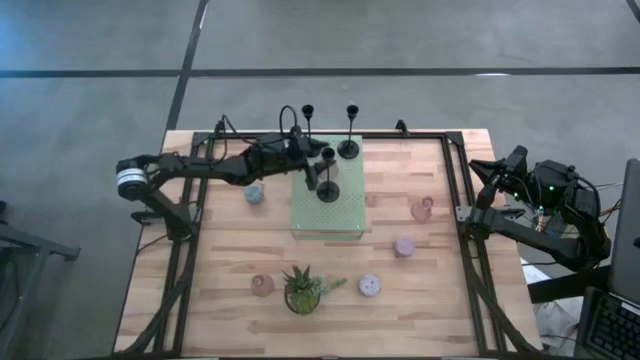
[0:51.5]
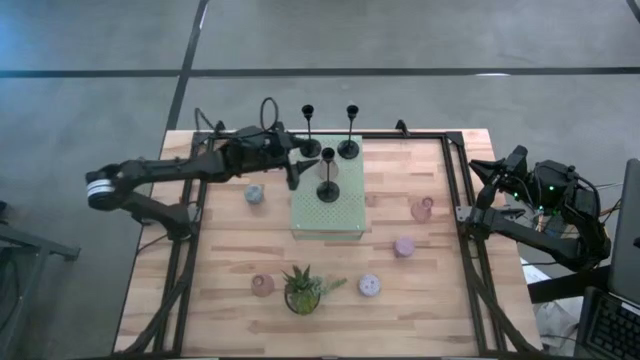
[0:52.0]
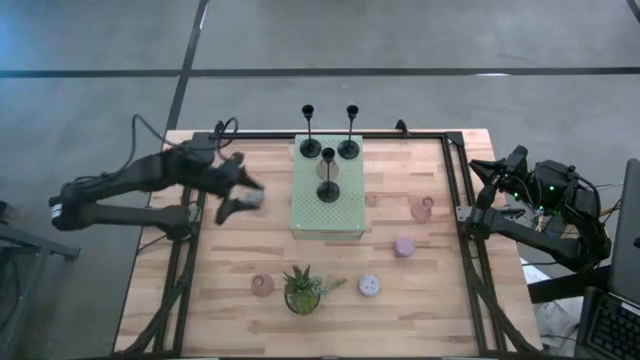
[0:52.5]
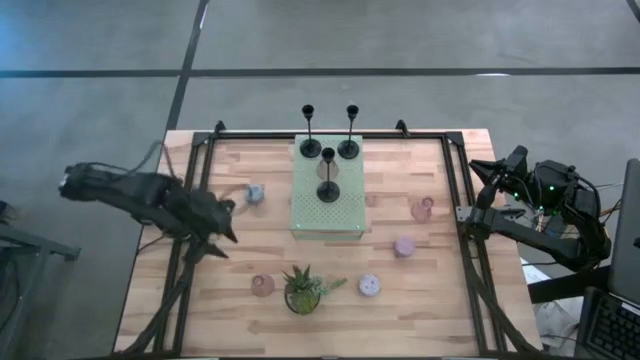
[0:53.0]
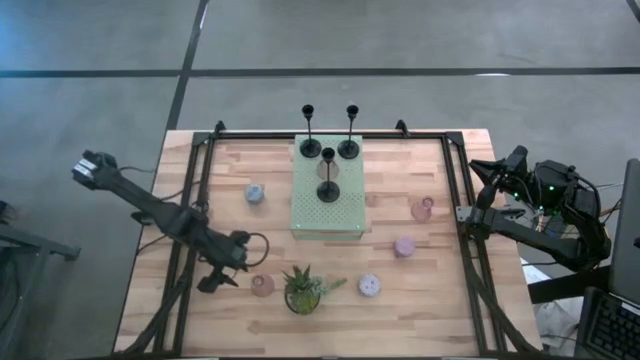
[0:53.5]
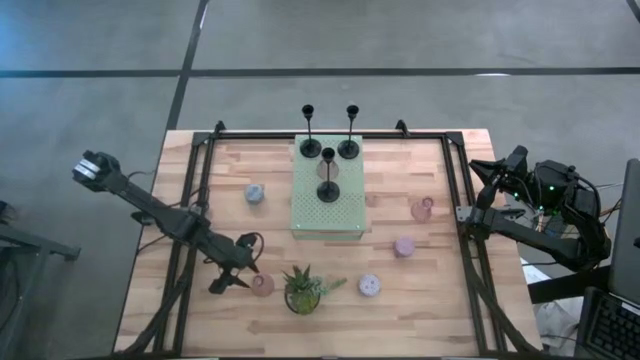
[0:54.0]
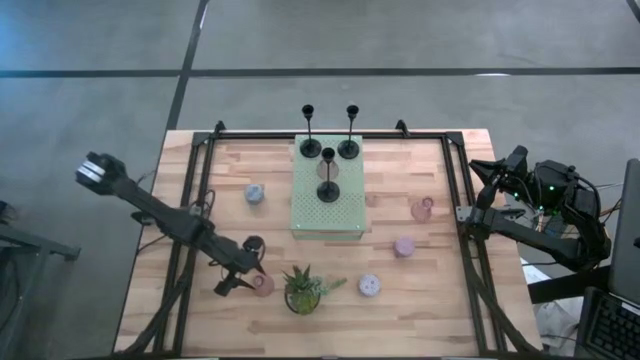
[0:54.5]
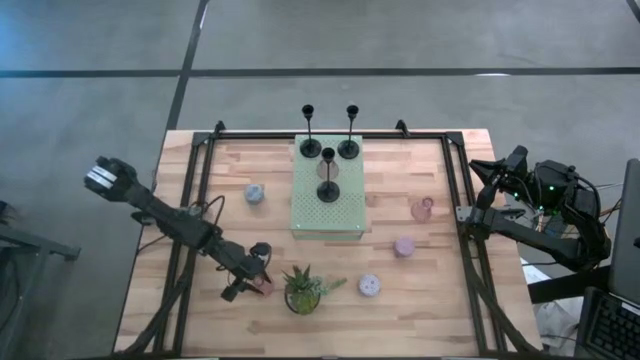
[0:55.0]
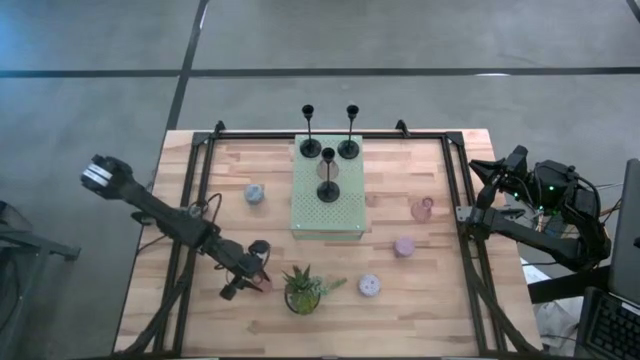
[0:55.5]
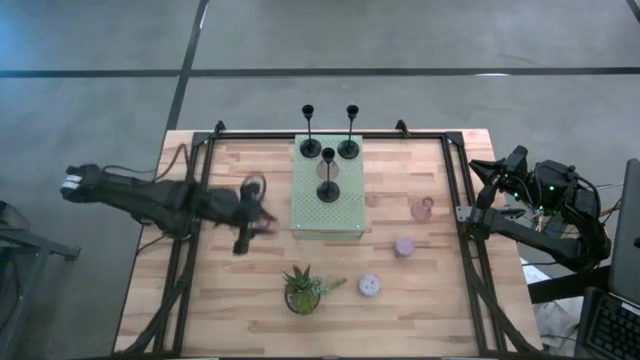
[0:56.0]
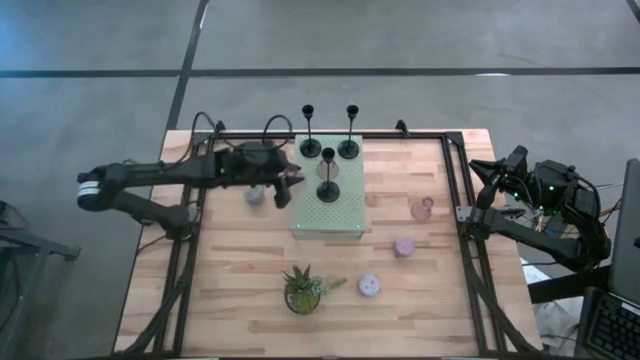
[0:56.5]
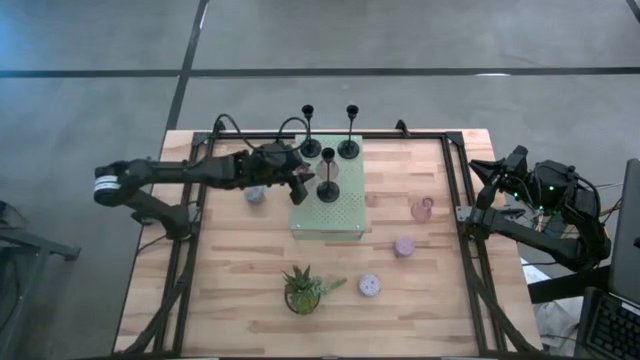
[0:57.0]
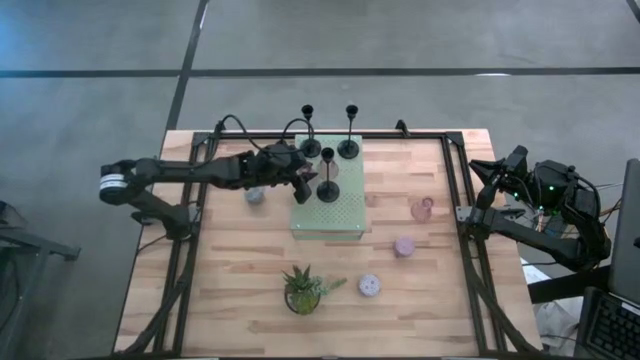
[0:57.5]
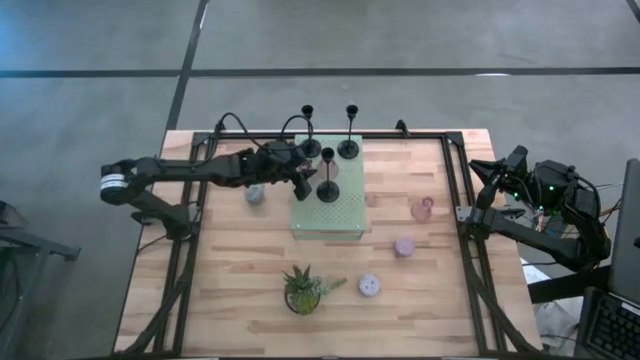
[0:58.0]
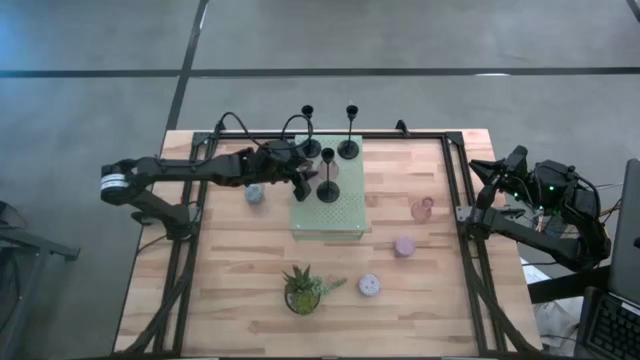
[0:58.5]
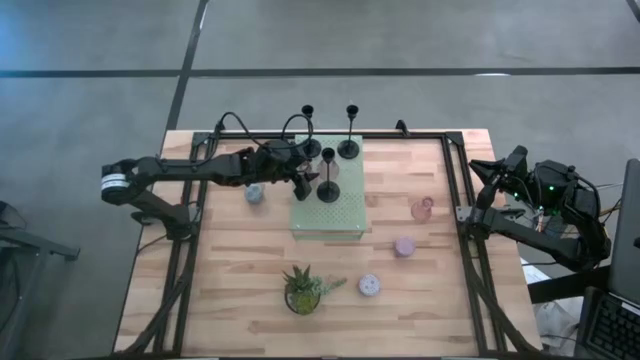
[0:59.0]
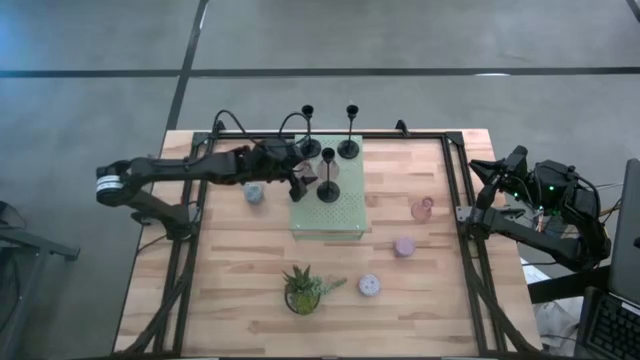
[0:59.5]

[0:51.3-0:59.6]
Task: Pick & Place candle stick holders
Put the bottom pink glass candle holder on the shelf

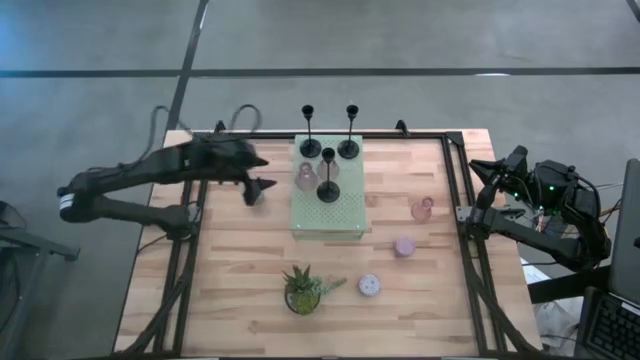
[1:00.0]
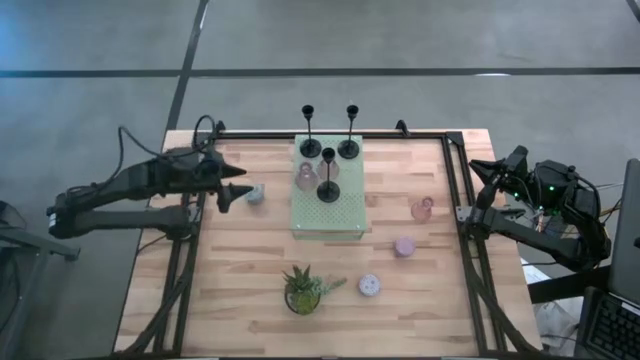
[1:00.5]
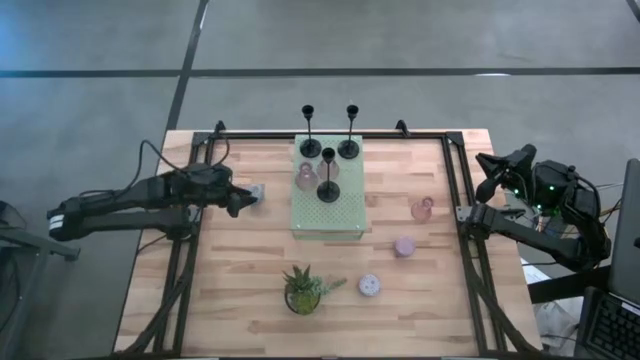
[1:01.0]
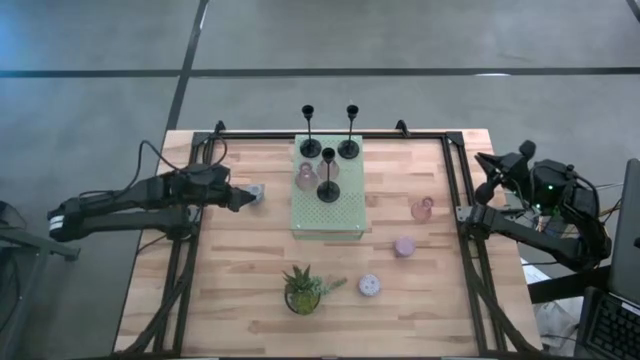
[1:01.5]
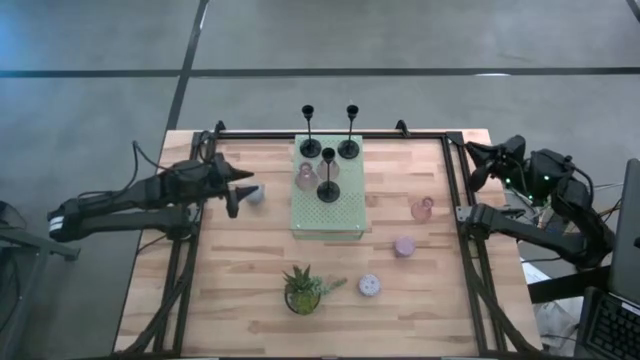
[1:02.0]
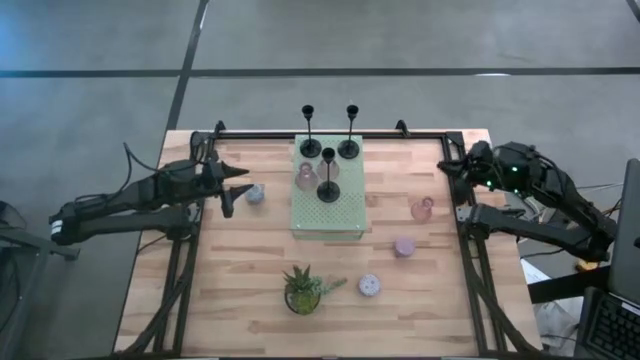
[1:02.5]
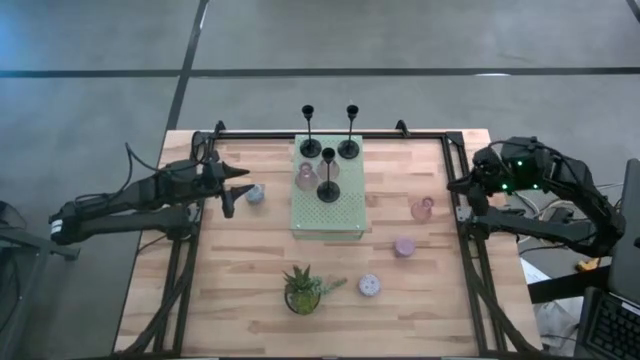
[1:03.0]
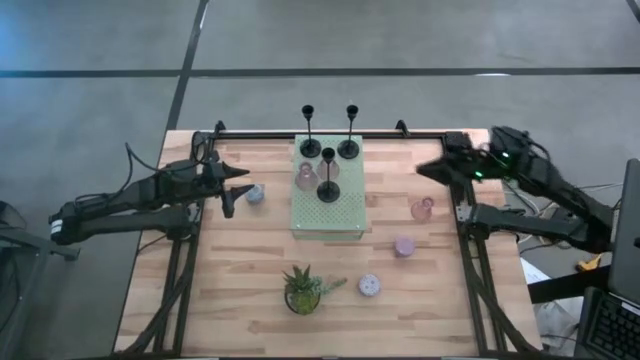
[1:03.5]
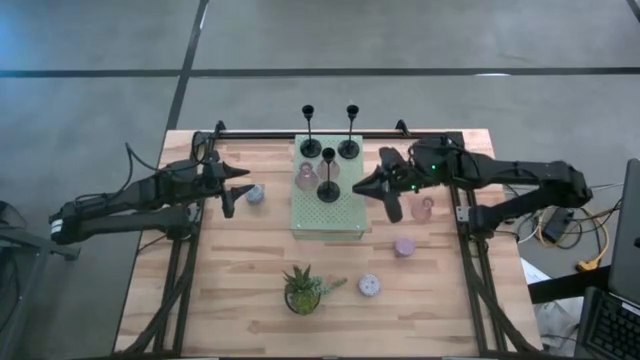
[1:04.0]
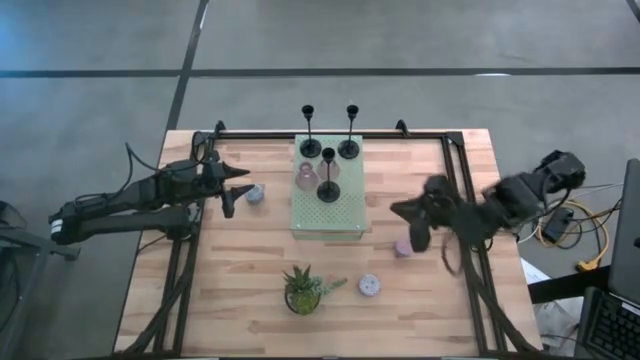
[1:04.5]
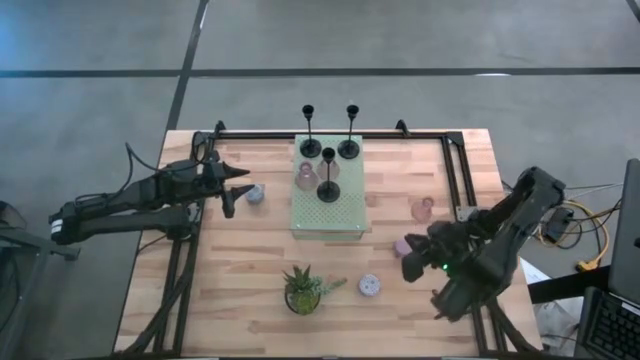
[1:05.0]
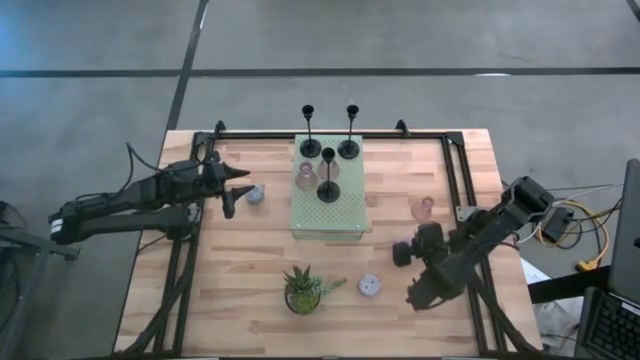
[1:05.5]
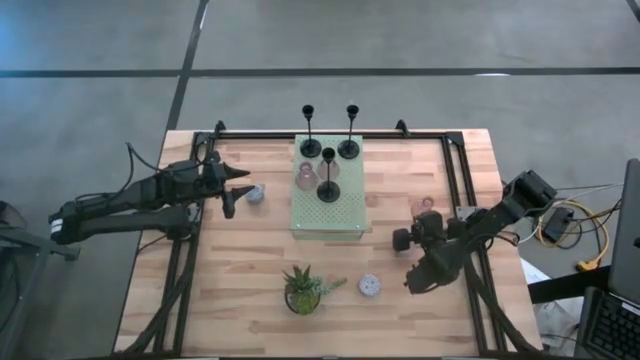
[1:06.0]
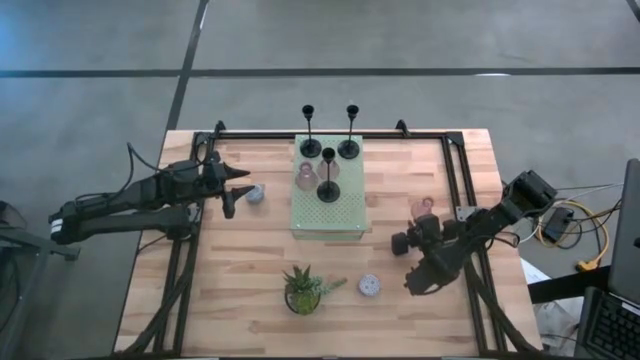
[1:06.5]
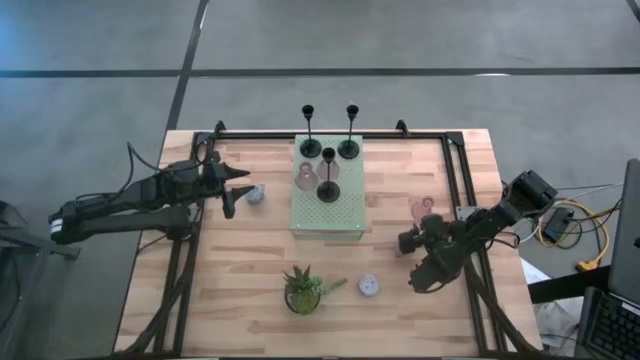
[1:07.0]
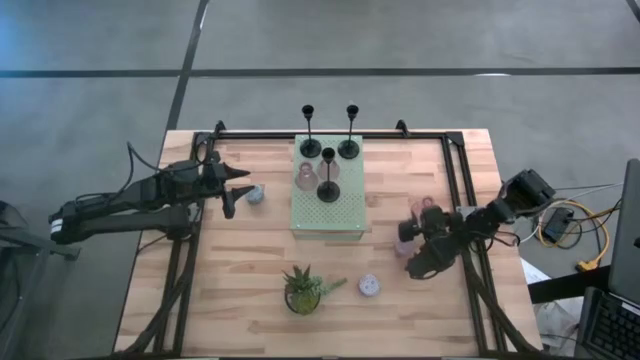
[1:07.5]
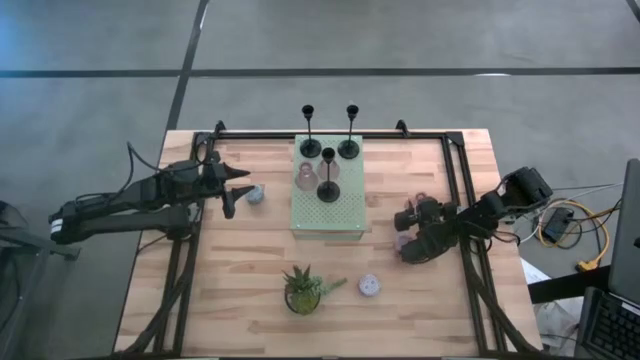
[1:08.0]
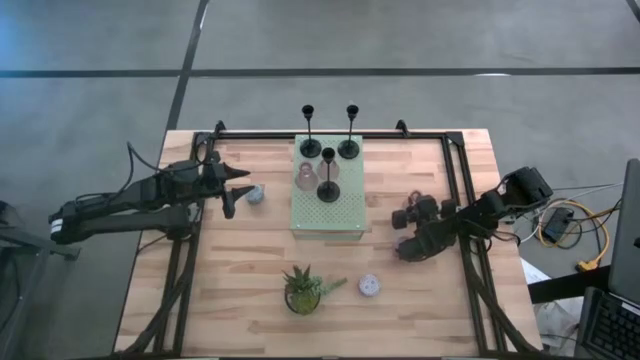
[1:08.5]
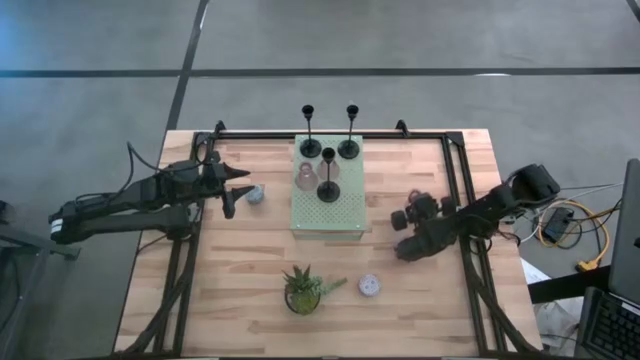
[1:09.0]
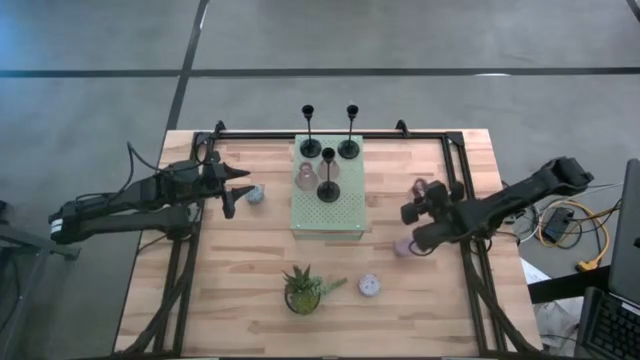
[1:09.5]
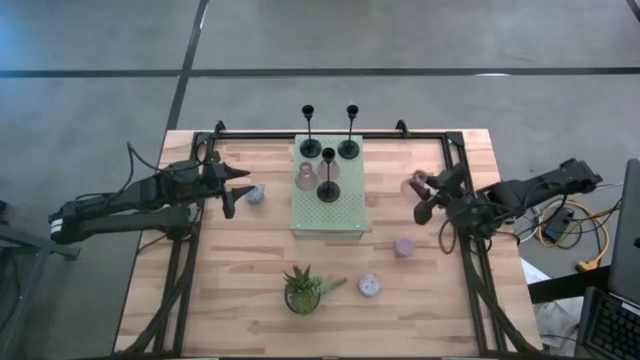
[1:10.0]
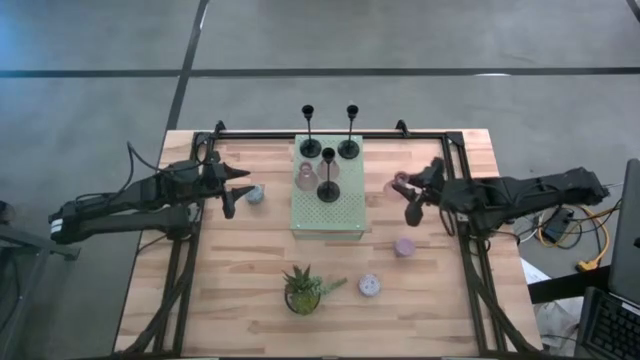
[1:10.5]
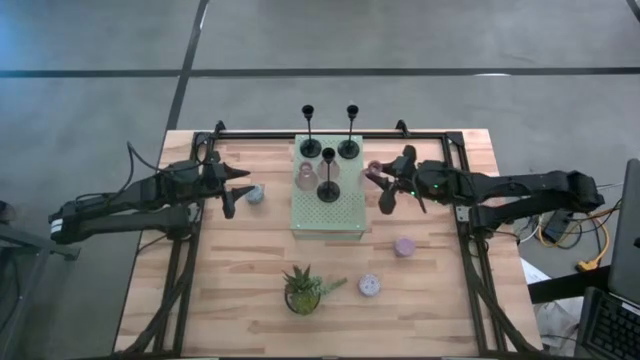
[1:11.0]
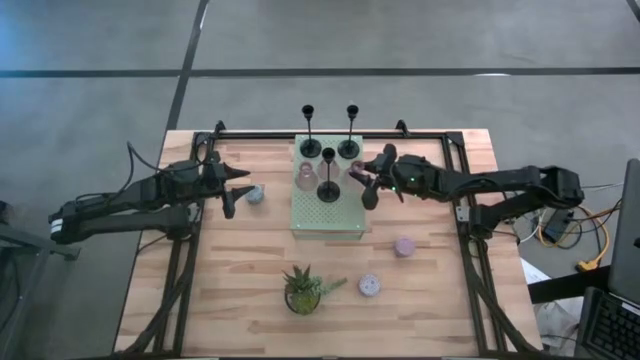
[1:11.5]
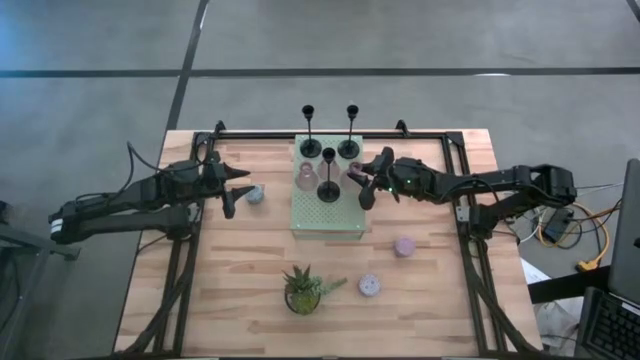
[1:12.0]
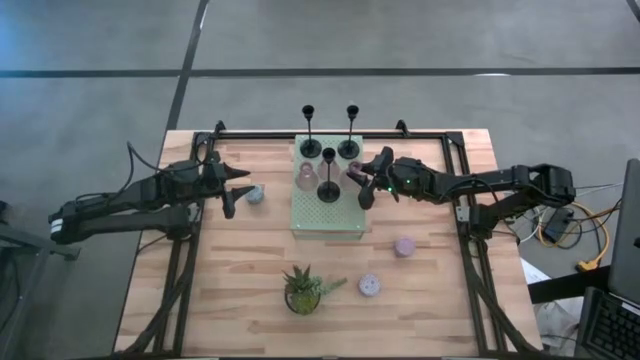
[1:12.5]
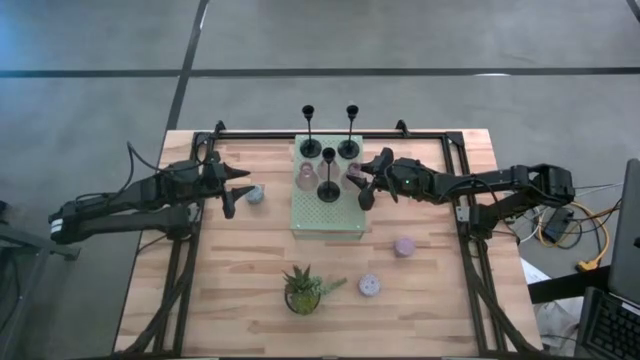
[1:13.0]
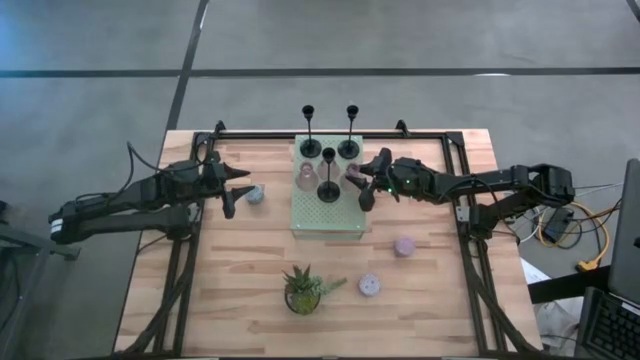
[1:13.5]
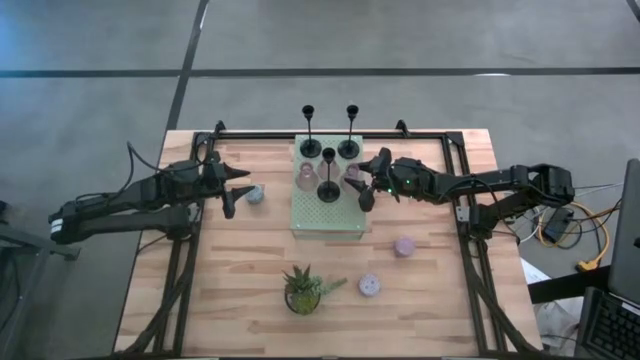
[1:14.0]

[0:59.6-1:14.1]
Put the pink glass candle on the shelf
